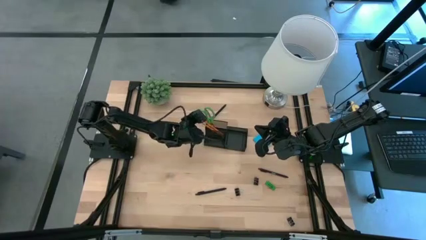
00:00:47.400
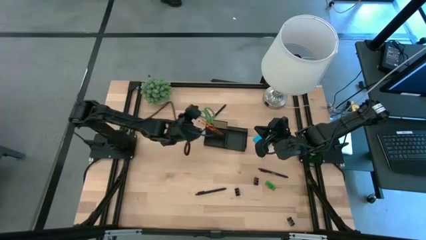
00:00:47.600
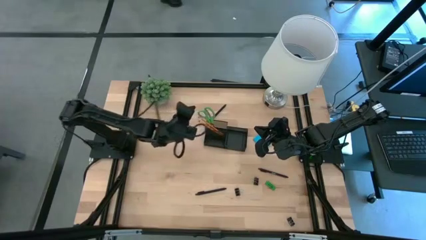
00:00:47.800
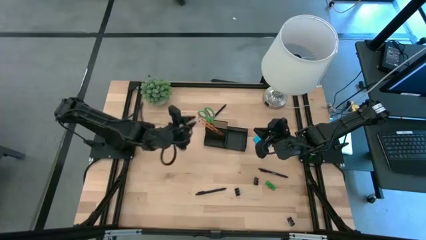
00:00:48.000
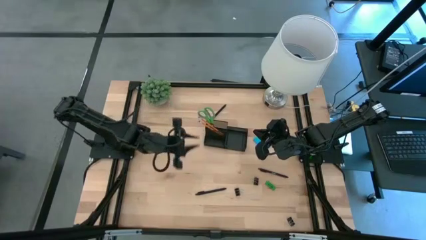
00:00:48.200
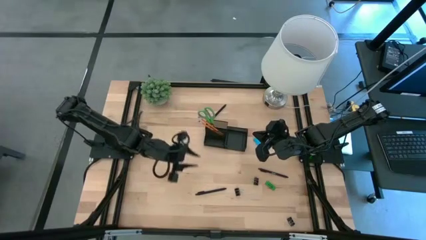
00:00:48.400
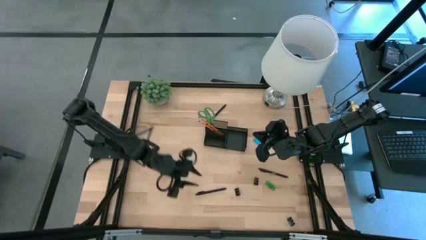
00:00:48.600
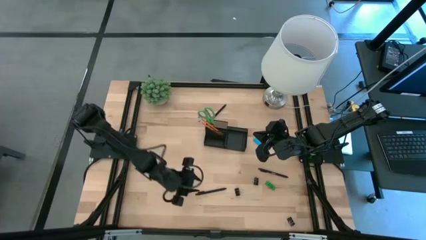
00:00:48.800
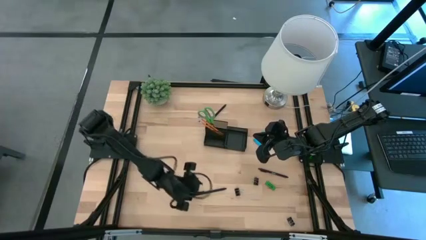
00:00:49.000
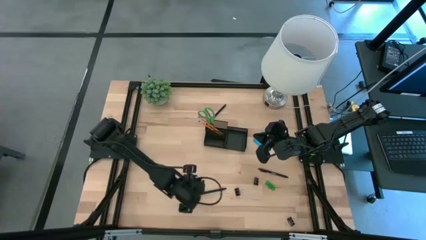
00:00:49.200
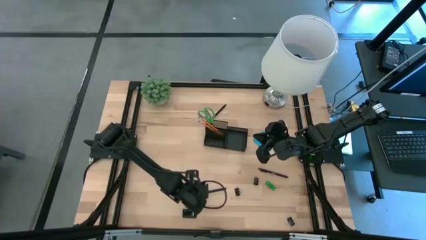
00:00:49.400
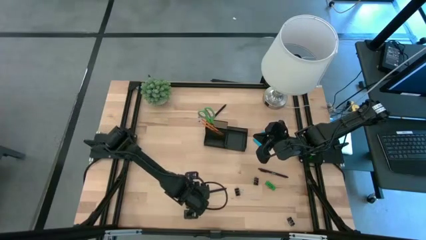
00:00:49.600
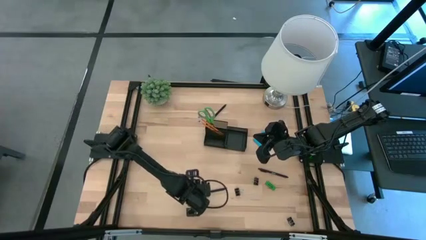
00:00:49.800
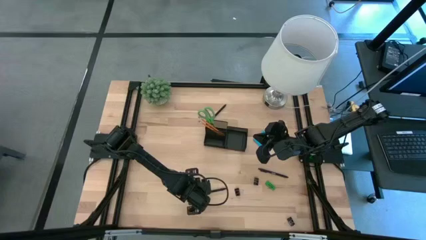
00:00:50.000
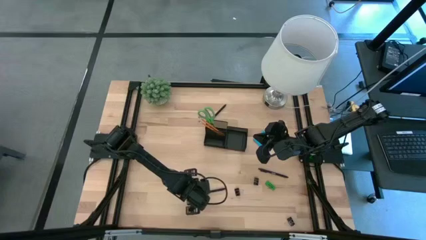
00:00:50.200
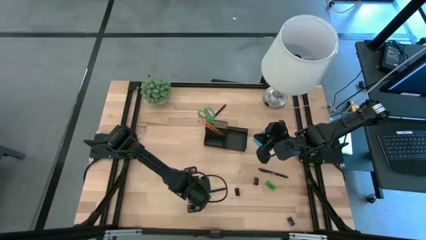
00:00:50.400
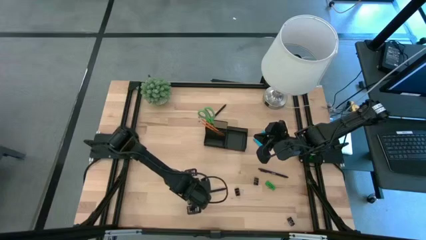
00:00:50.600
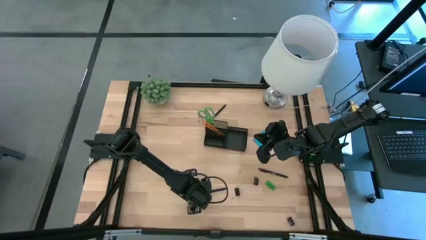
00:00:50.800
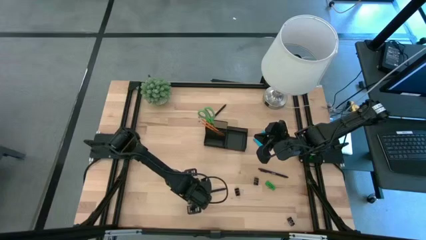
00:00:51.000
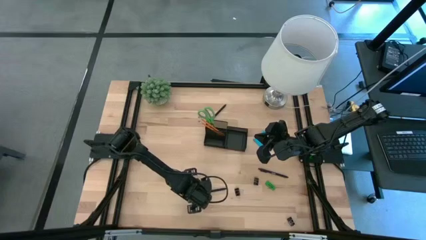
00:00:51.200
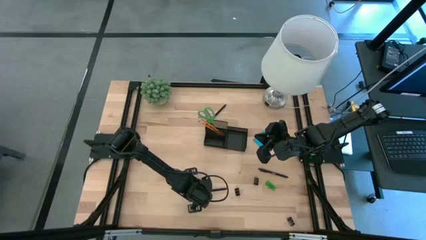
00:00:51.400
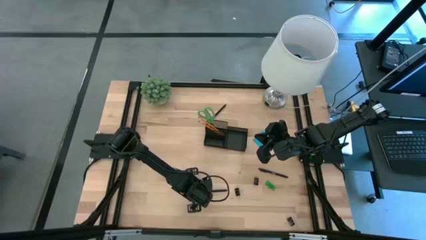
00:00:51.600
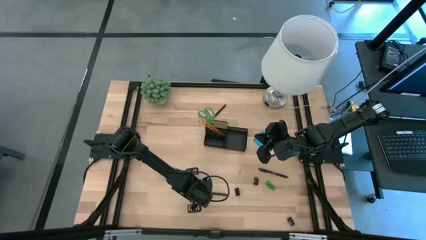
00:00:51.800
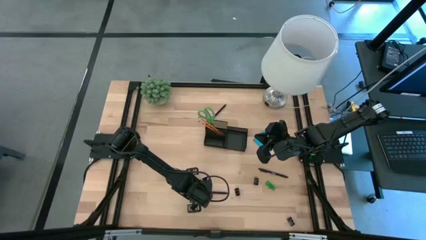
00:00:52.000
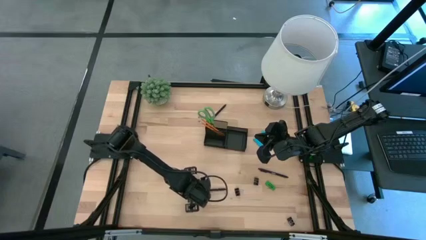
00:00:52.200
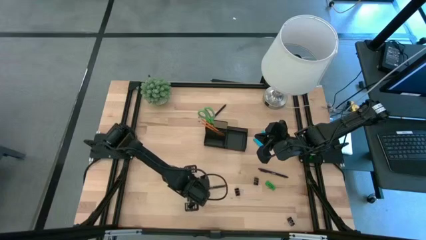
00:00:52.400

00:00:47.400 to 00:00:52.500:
Task: Pick and place office supplies into organizer
Put the bottom black pen into the black organizer

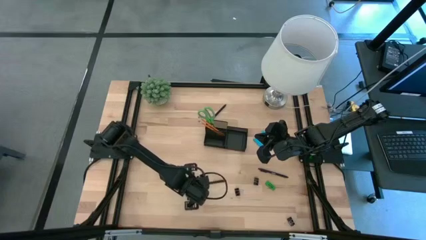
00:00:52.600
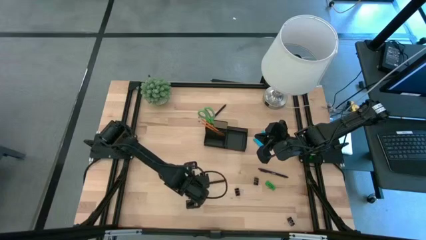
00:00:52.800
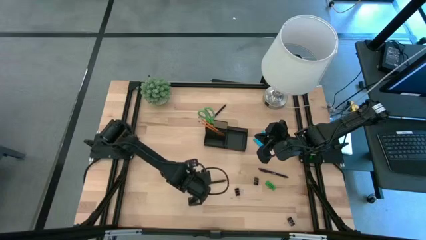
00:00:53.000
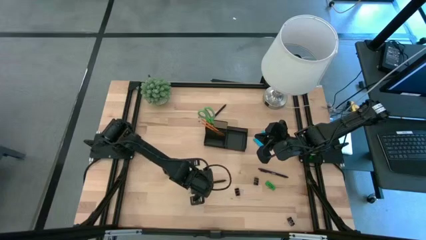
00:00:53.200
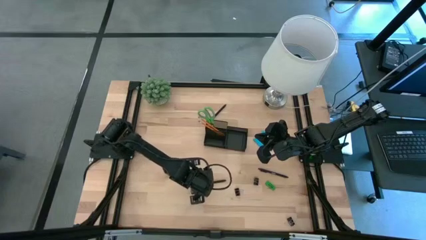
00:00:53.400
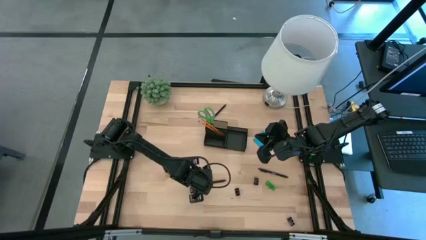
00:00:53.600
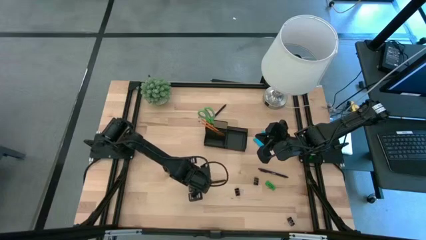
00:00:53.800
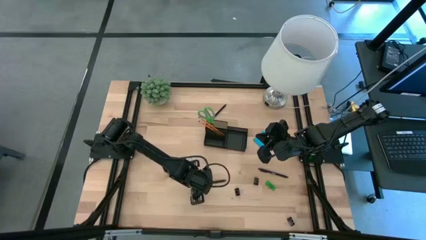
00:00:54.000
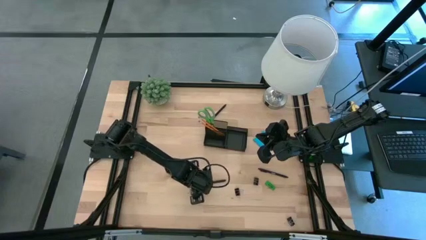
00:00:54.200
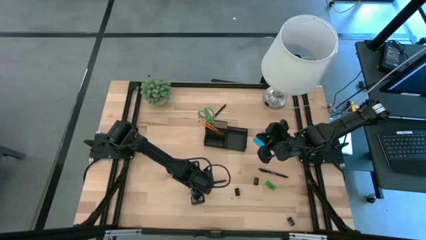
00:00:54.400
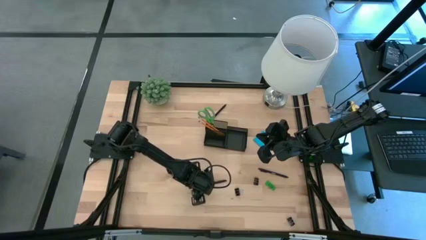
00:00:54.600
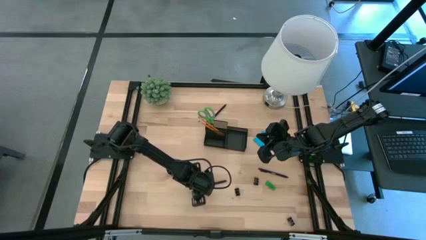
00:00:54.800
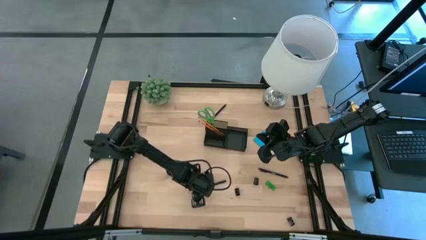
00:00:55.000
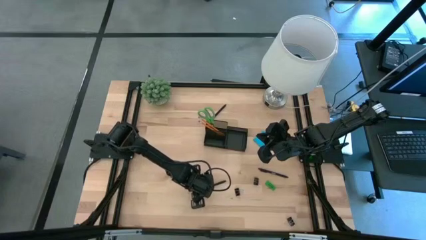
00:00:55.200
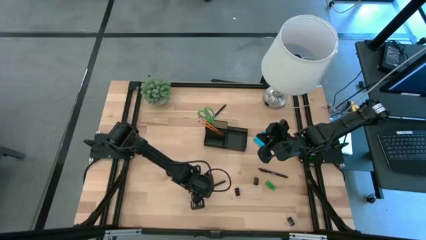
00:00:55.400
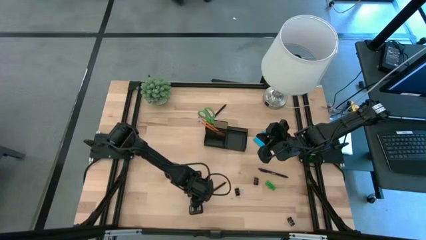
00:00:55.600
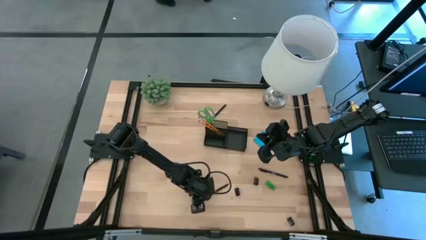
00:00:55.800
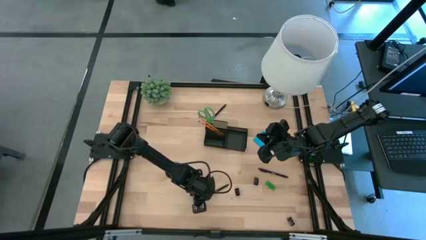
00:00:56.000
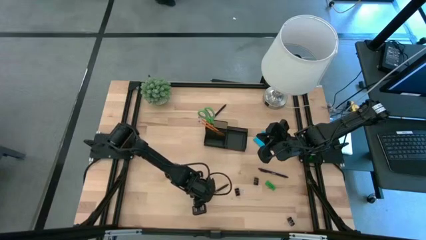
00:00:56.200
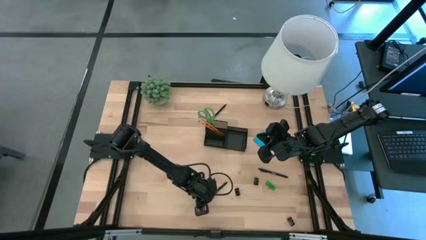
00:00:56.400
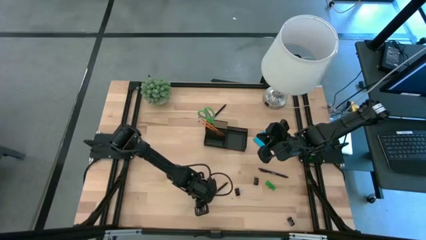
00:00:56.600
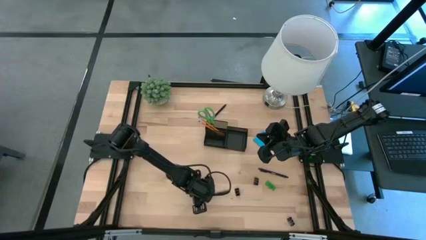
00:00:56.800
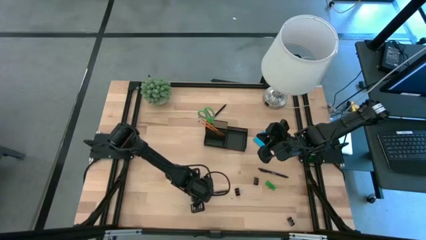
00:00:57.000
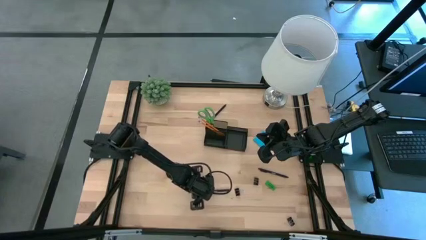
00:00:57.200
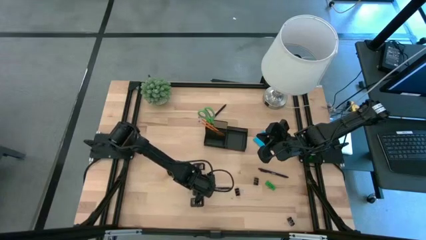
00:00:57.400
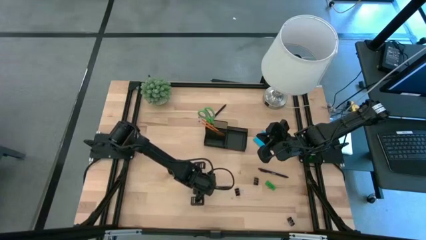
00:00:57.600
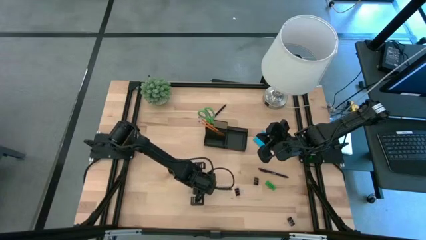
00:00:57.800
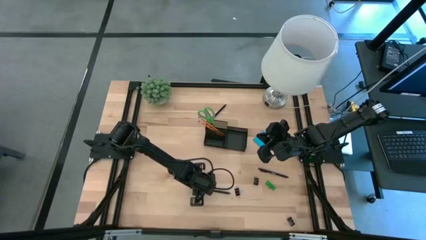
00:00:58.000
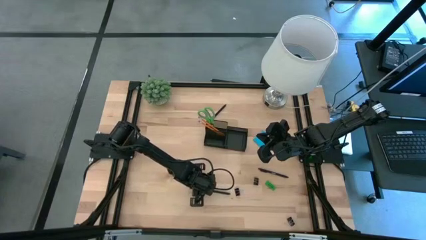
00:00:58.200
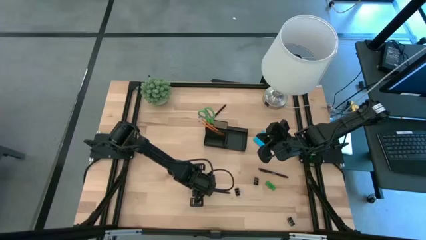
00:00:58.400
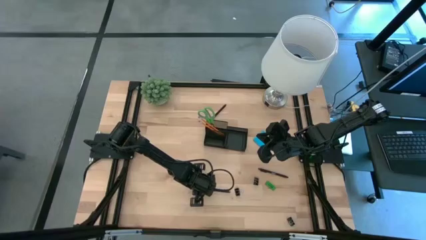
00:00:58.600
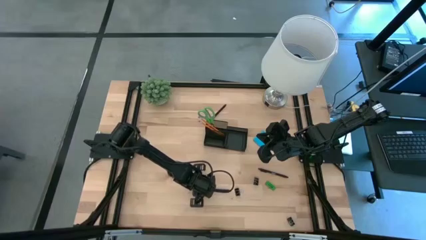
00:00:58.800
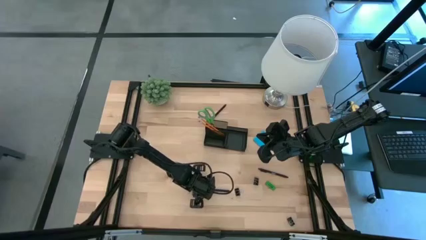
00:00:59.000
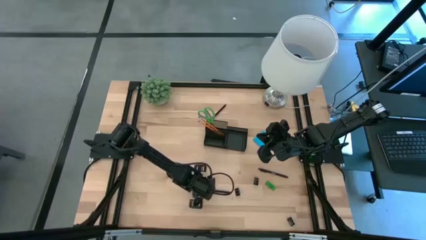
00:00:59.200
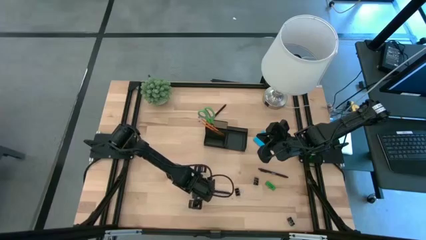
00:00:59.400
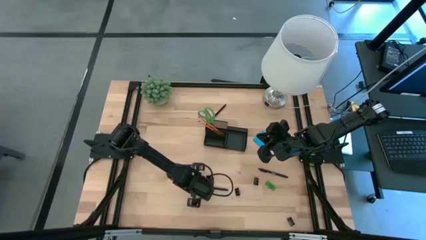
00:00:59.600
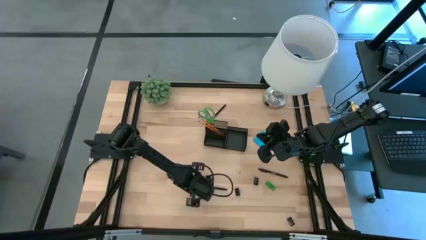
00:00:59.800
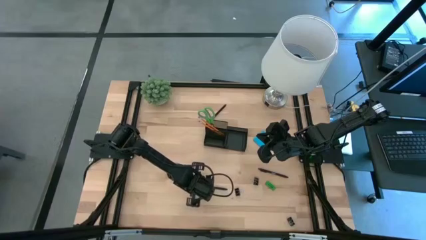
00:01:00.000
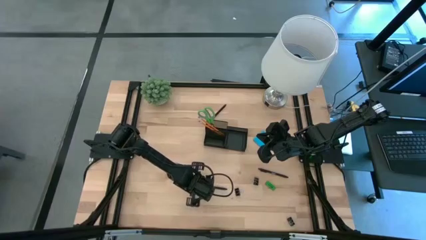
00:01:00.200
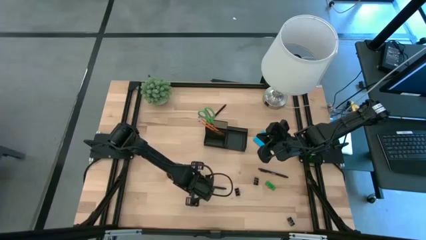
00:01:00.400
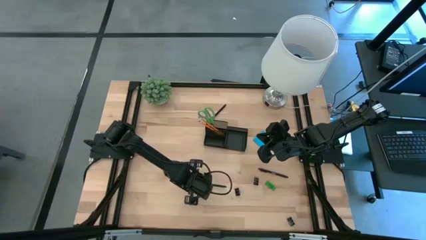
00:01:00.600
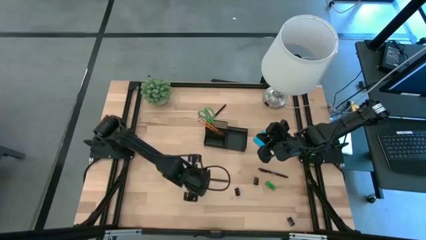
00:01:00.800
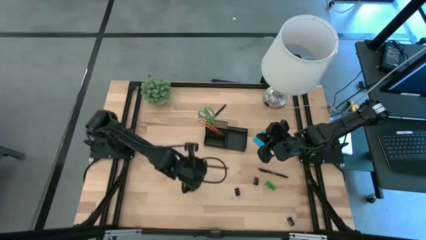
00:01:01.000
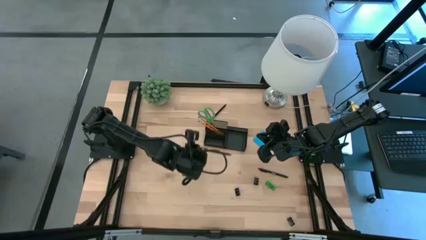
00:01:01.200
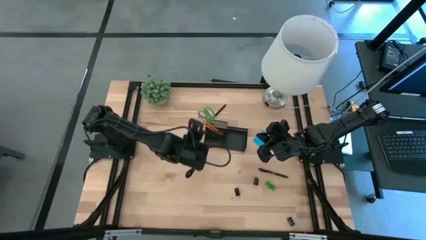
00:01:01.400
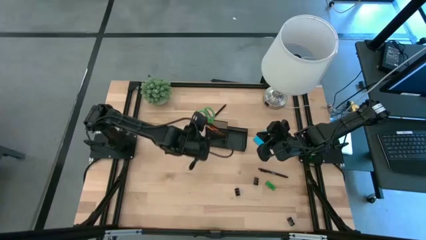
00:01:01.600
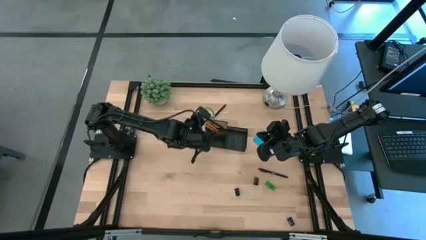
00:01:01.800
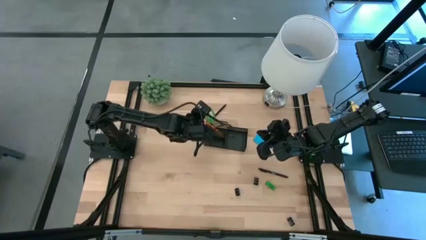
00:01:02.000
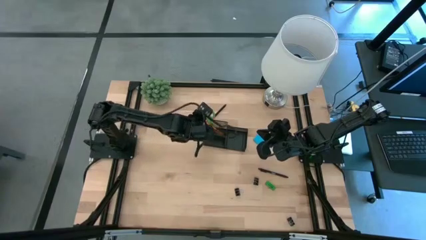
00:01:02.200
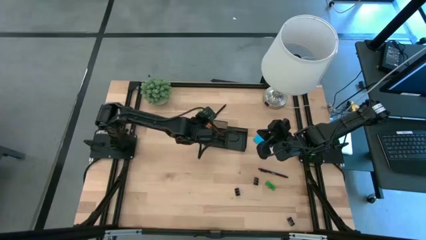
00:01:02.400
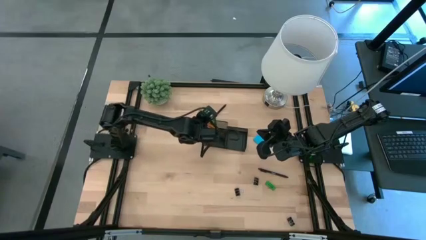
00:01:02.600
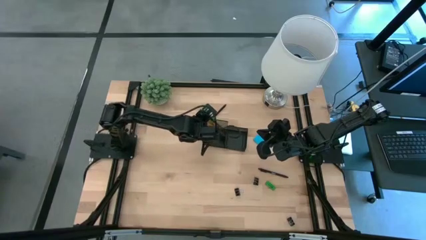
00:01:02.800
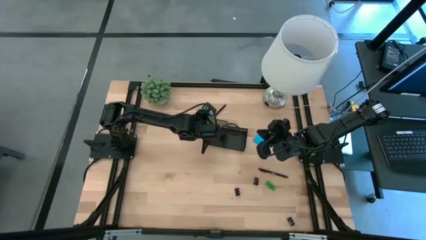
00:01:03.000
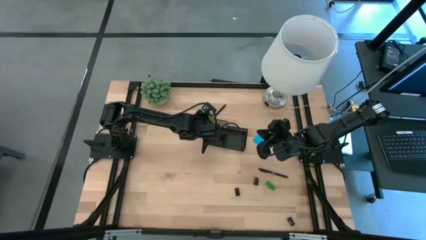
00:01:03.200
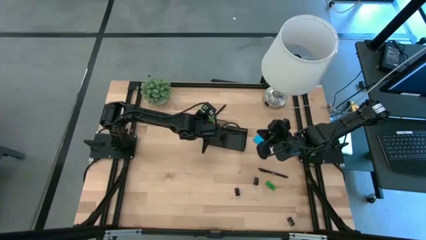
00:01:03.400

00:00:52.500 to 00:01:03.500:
Put the bottom left black pen into the black organizer
